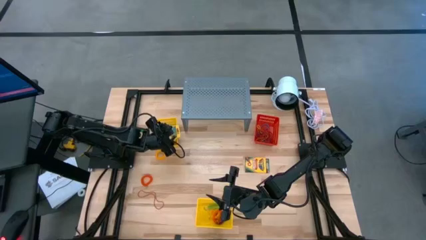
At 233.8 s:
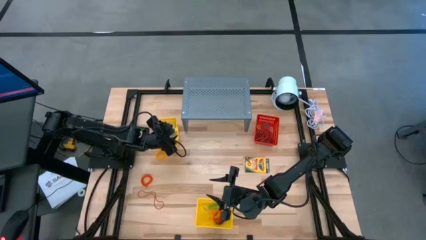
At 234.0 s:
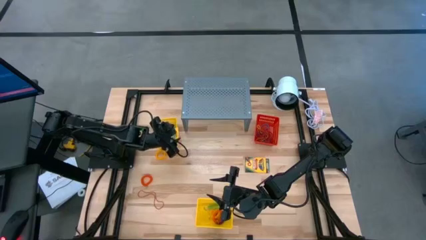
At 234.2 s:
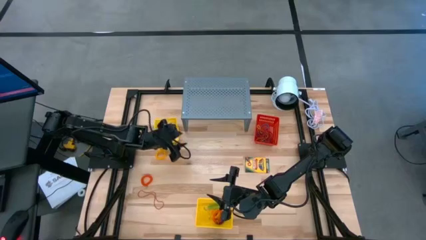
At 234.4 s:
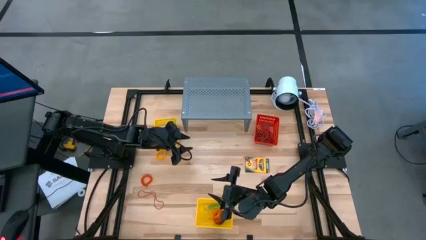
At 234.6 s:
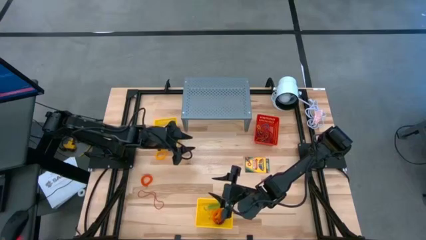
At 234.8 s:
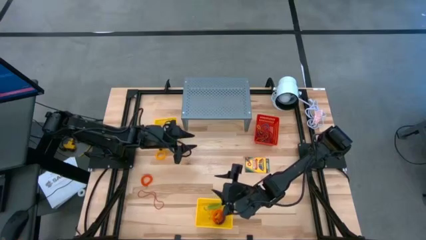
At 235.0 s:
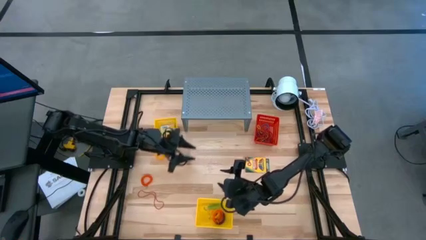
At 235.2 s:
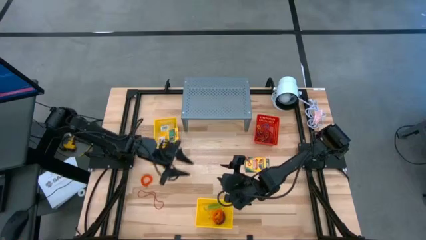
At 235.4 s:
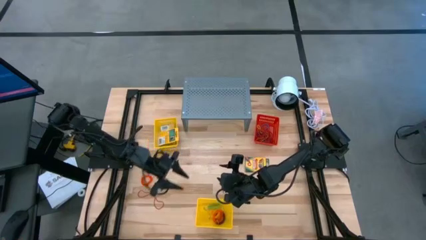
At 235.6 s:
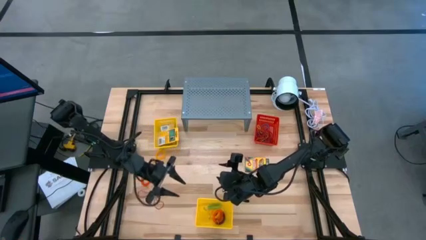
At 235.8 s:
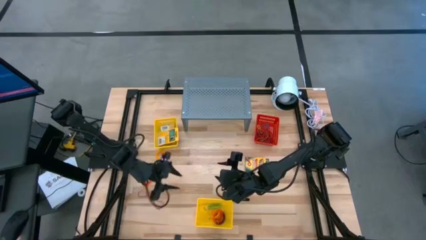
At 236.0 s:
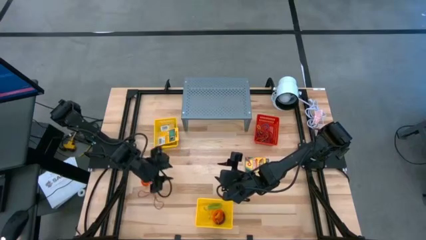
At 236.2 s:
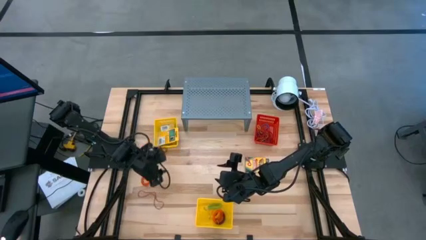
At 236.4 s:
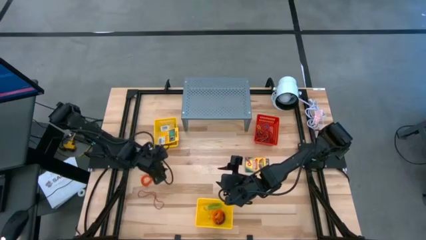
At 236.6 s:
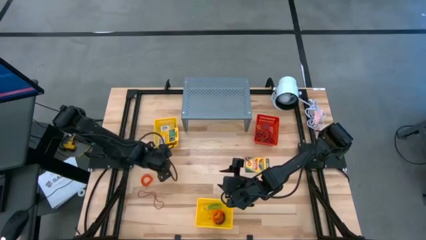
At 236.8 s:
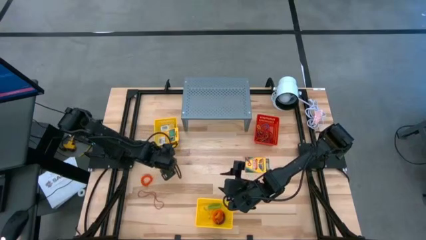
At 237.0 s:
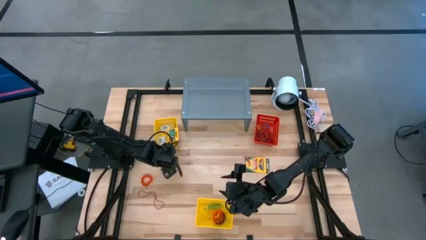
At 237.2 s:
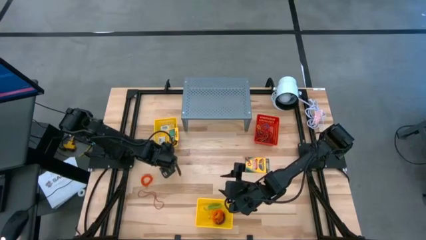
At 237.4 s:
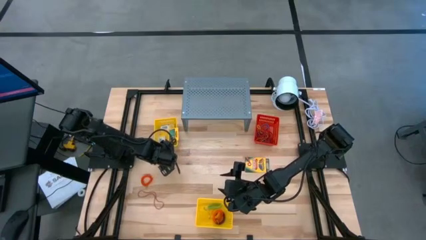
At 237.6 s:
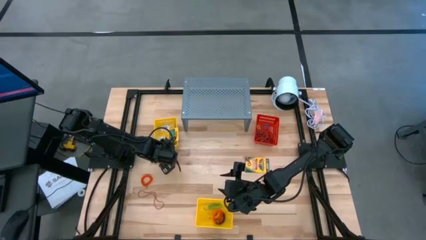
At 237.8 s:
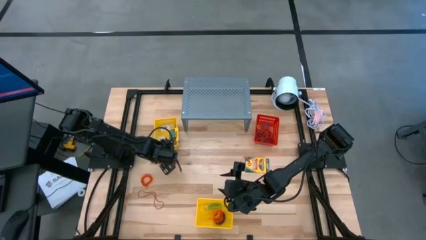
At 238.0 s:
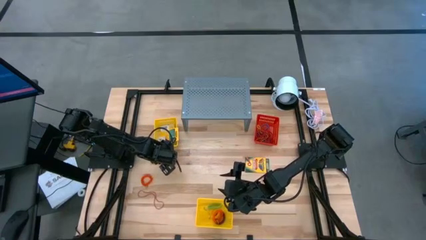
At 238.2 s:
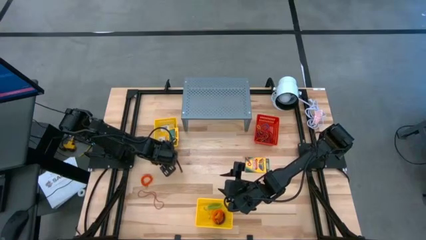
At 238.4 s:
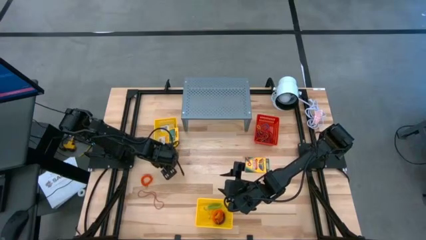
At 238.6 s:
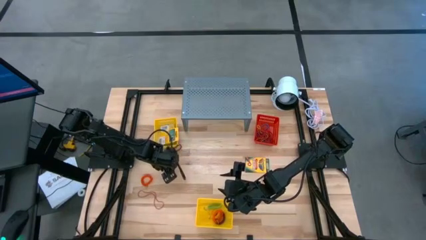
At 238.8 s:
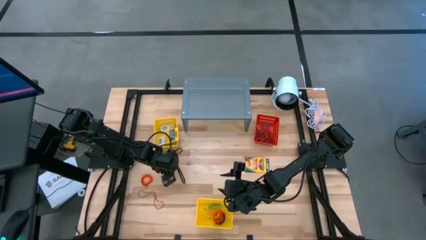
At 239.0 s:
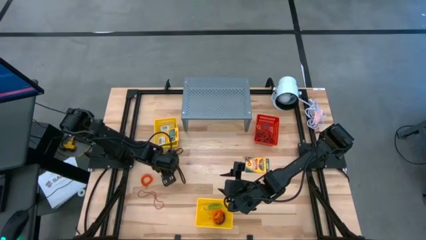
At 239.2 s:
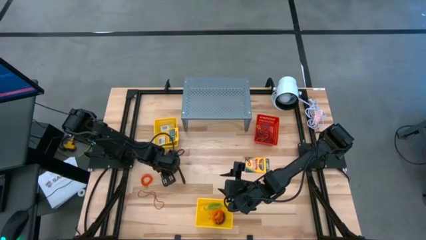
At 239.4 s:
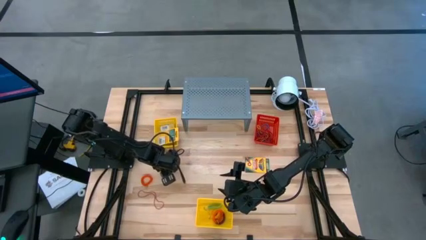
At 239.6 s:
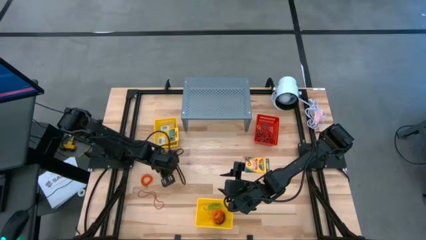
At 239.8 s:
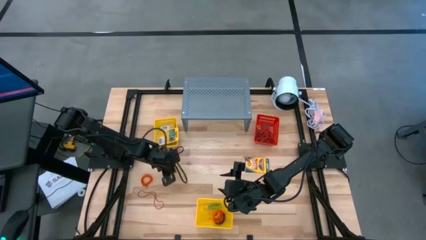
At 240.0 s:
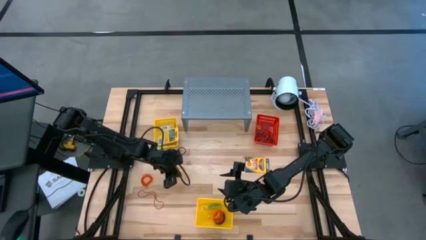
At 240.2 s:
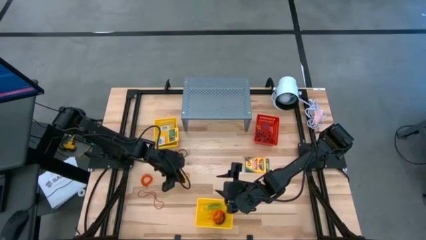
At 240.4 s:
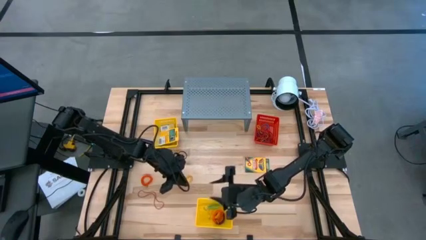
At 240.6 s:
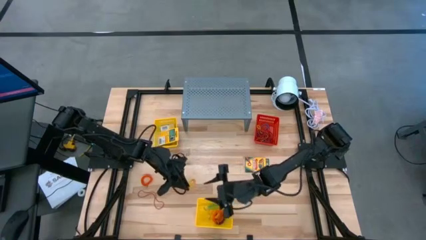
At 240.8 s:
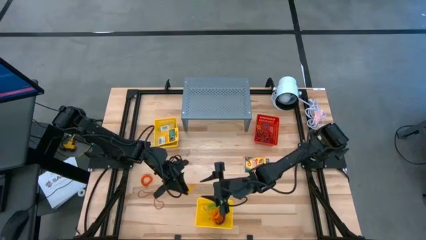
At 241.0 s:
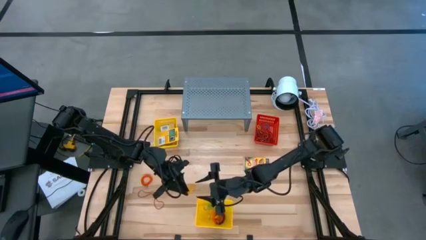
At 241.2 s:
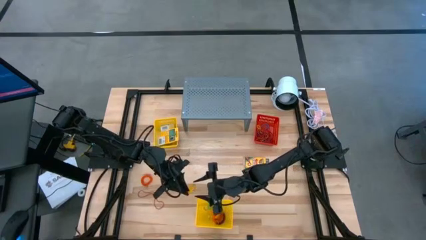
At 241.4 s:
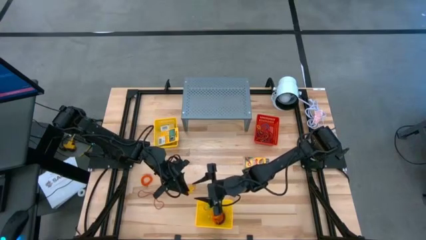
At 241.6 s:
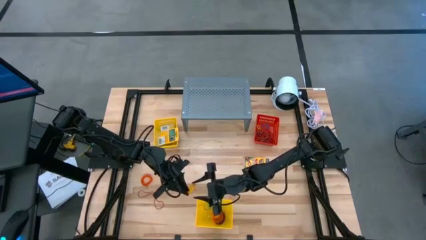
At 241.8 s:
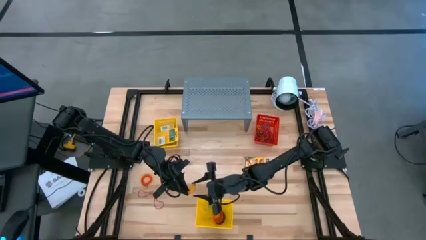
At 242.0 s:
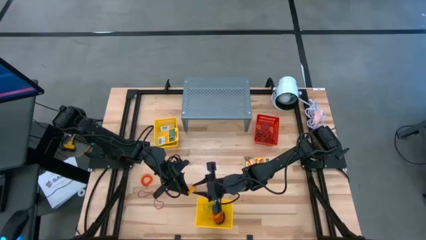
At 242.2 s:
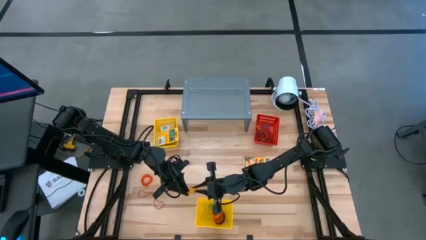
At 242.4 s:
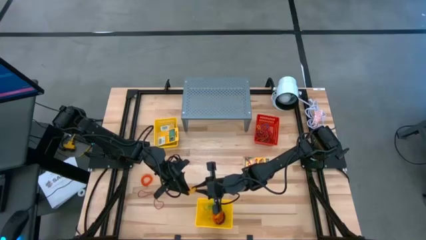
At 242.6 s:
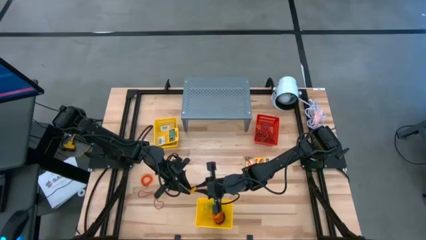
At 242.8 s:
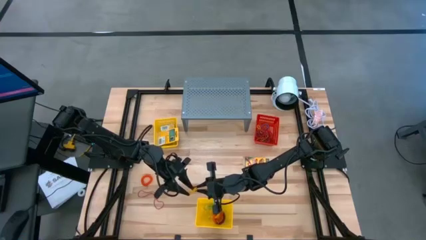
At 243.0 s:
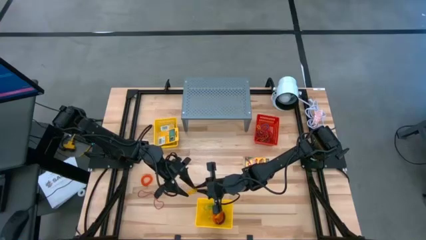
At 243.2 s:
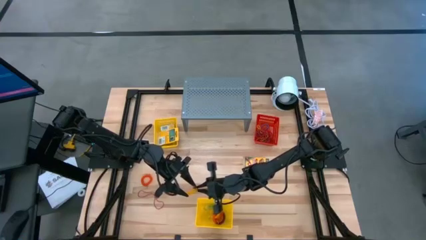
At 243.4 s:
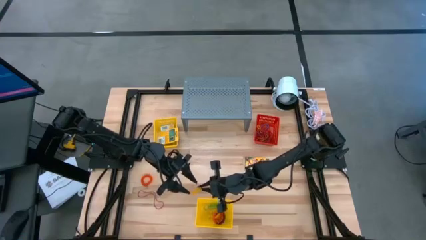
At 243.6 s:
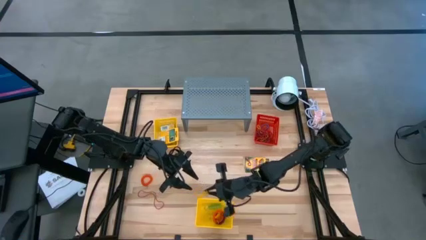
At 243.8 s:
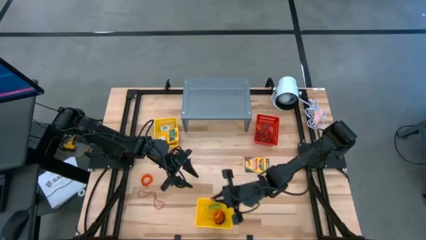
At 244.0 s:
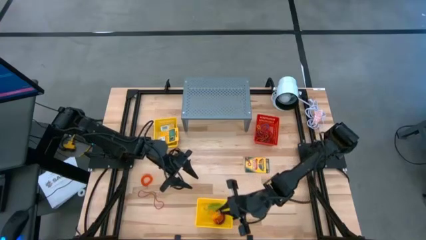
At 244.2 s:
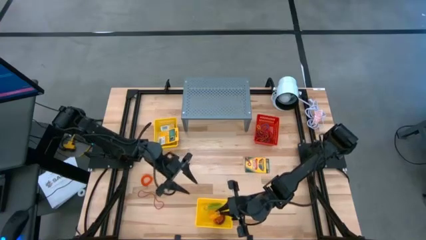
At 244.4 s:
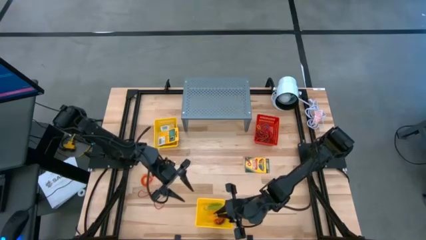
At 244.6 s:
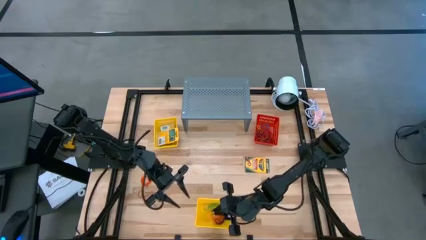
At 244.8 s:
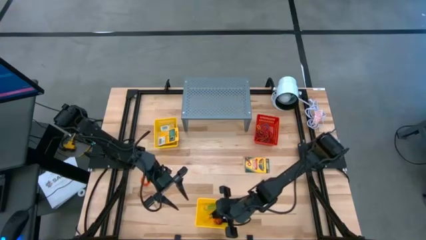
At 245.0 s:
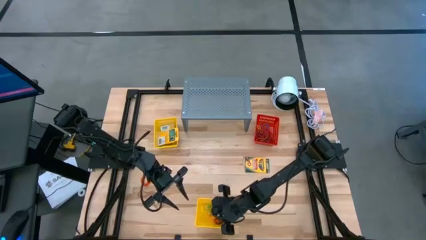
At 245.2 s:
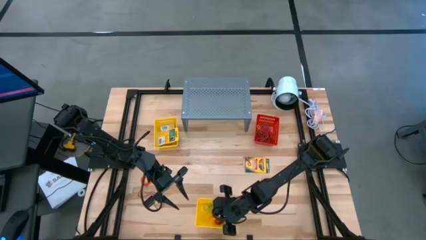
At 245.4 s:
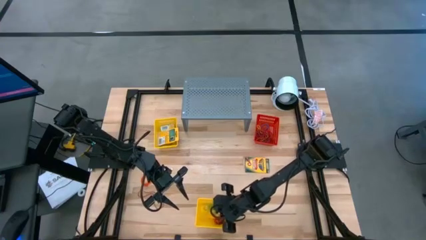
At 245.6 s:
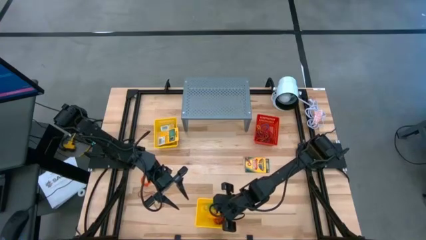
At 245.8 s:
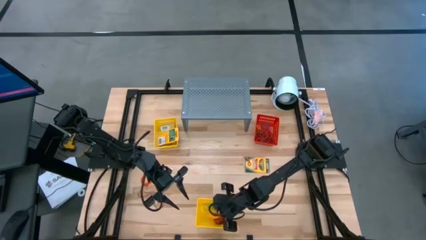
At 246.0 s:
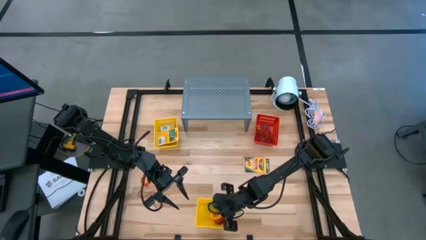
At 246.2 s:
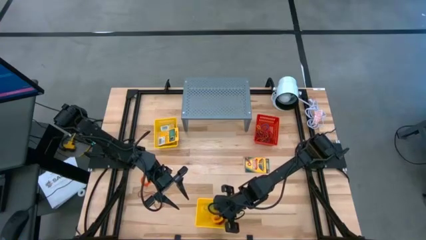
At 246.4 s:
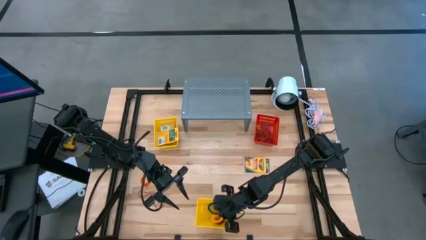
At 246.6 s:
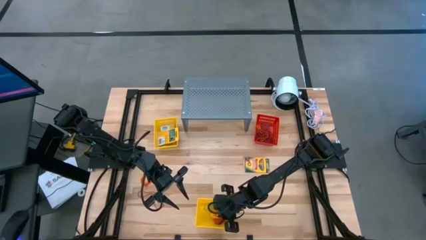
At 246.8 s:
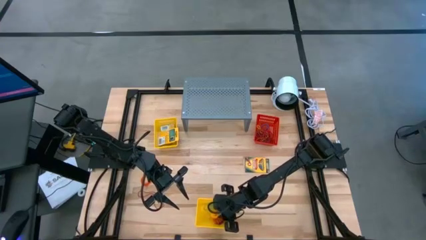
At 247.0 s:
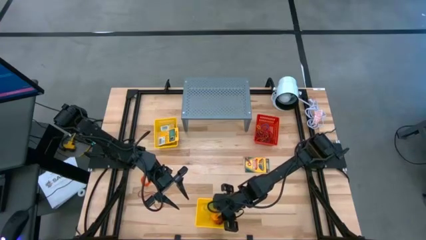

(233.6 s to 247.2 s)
Task: Pick & Place Office Desk Supplies
Put the yellow spiral keychain into the bottom yellow bin
